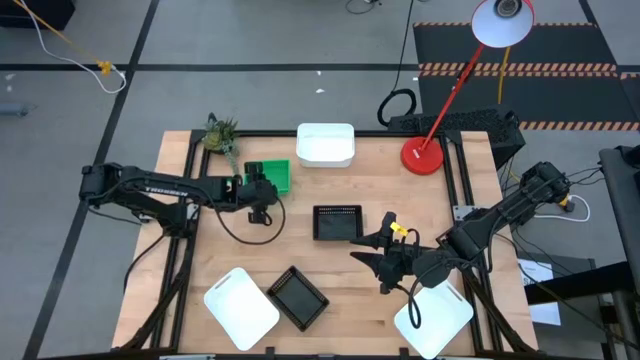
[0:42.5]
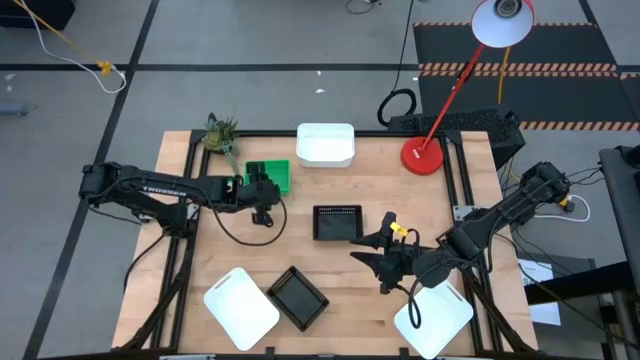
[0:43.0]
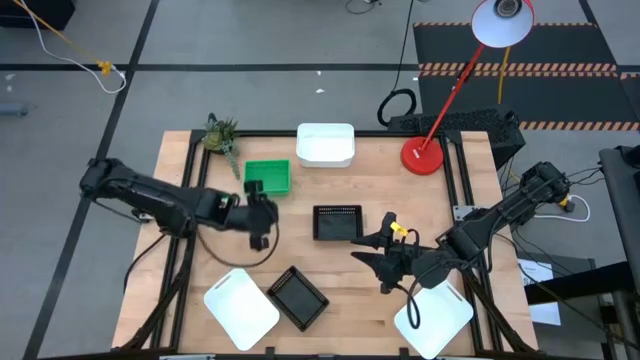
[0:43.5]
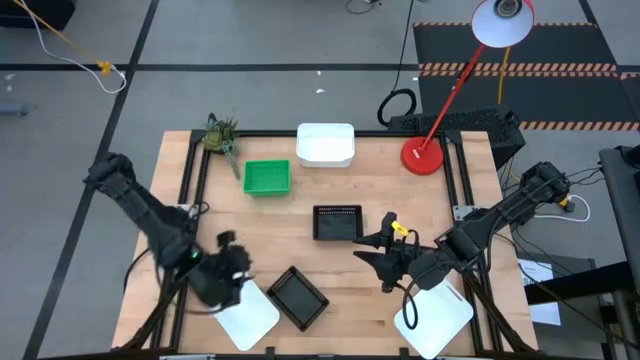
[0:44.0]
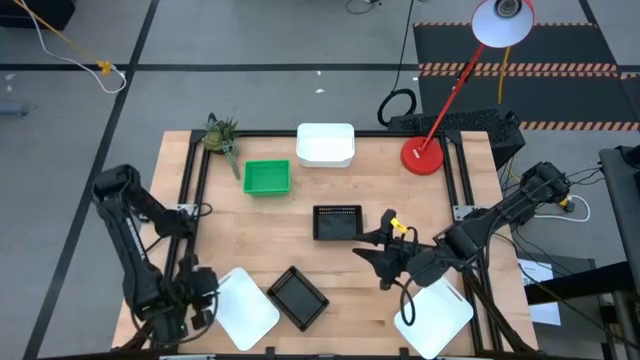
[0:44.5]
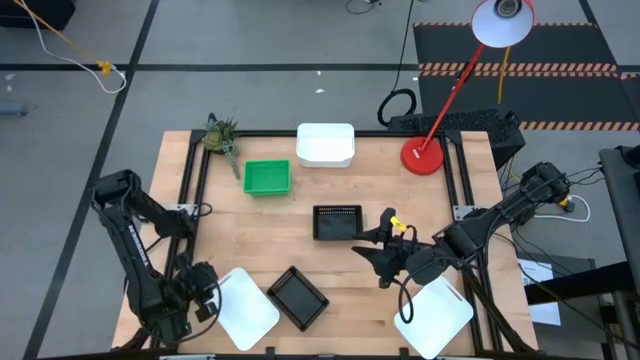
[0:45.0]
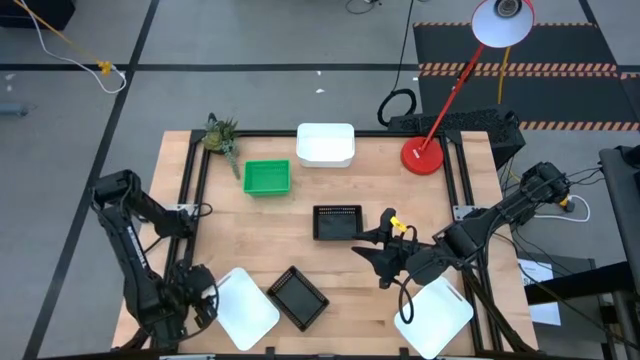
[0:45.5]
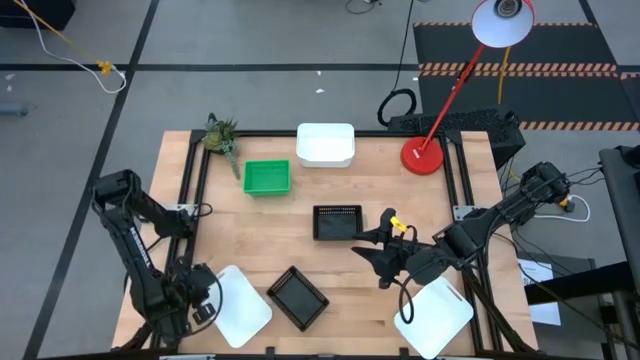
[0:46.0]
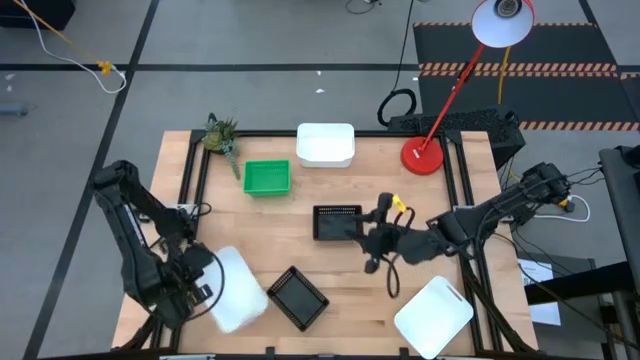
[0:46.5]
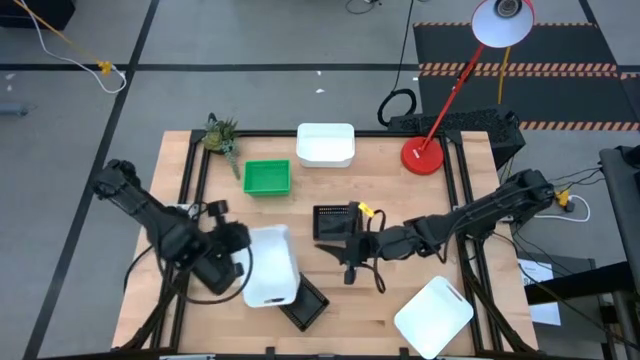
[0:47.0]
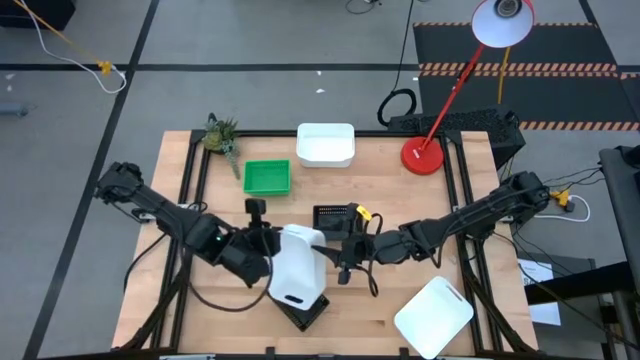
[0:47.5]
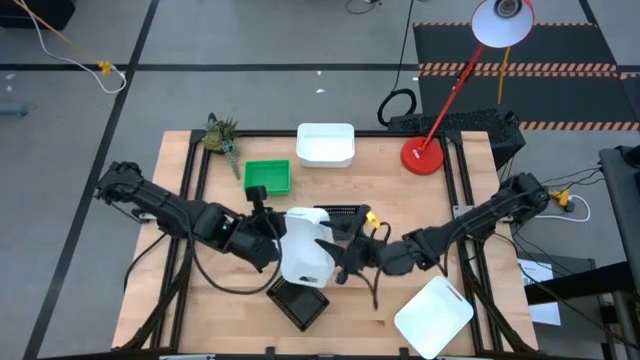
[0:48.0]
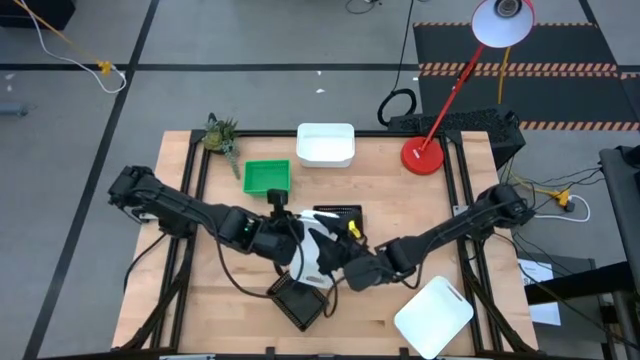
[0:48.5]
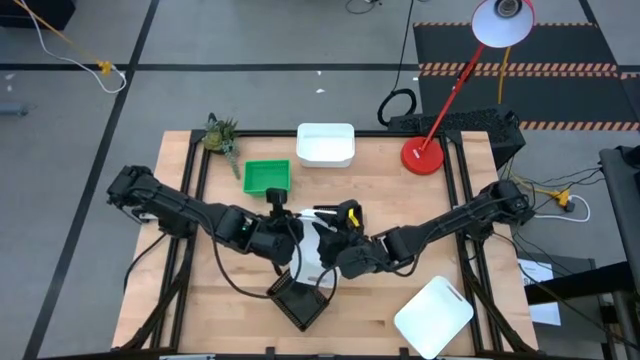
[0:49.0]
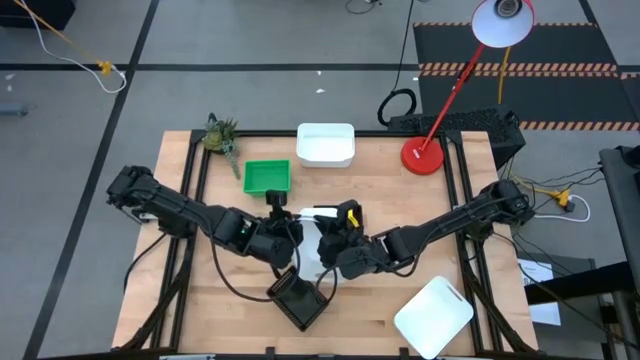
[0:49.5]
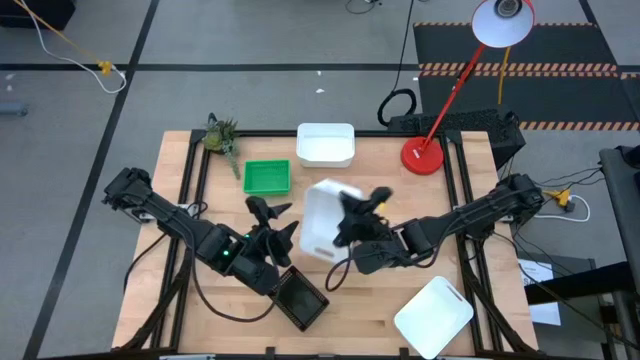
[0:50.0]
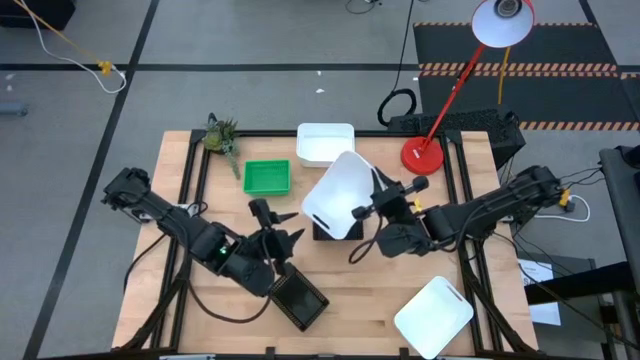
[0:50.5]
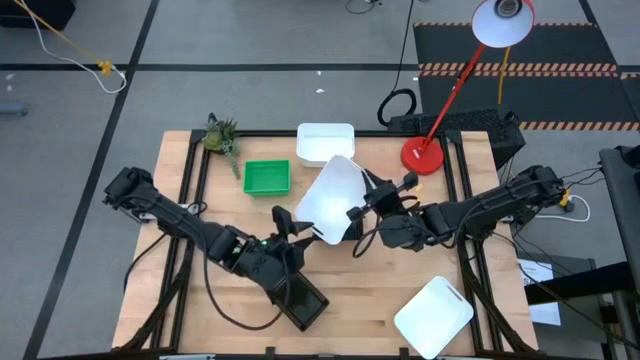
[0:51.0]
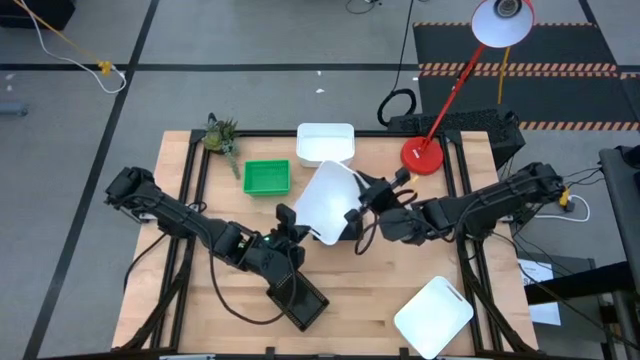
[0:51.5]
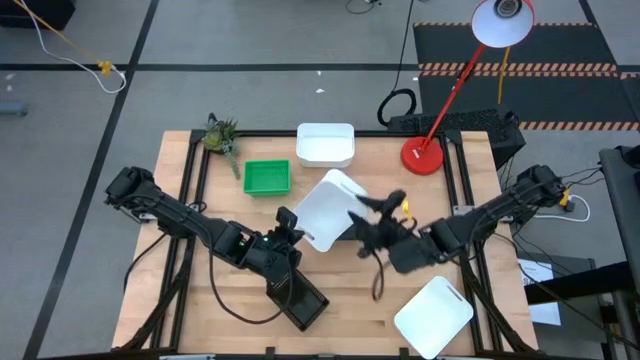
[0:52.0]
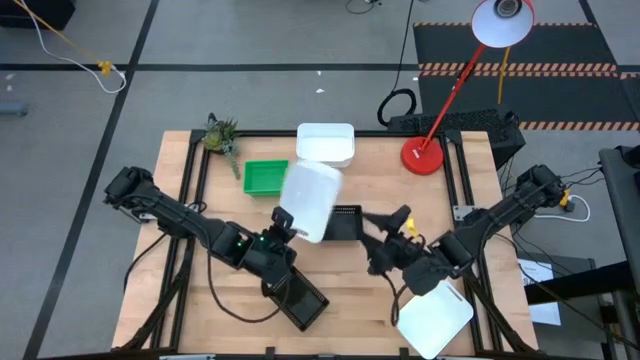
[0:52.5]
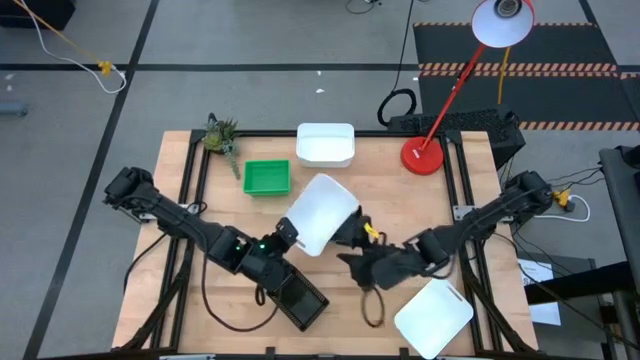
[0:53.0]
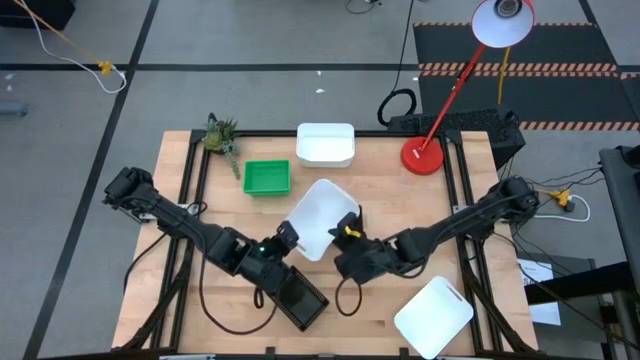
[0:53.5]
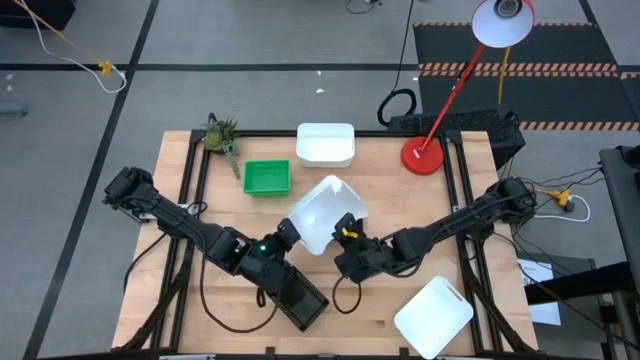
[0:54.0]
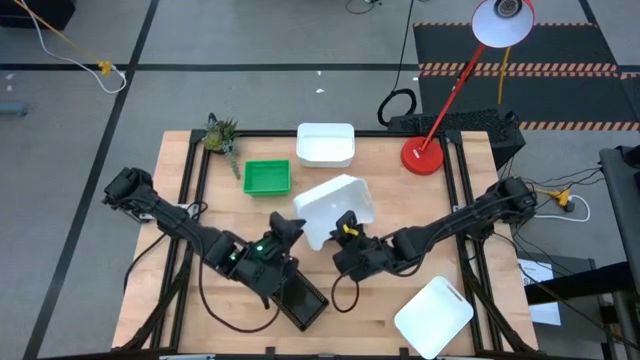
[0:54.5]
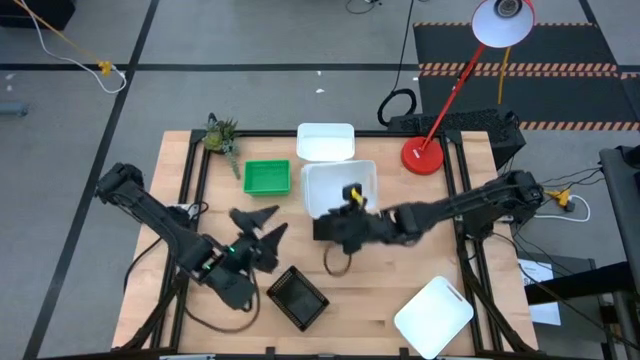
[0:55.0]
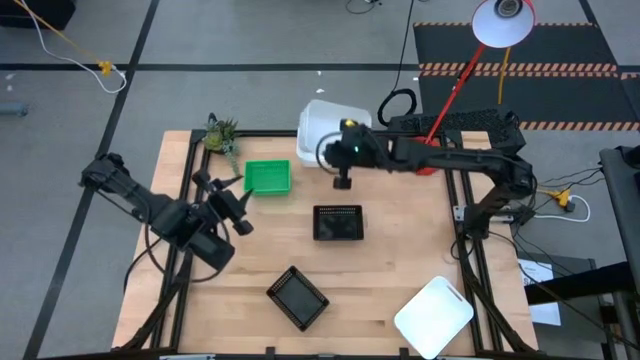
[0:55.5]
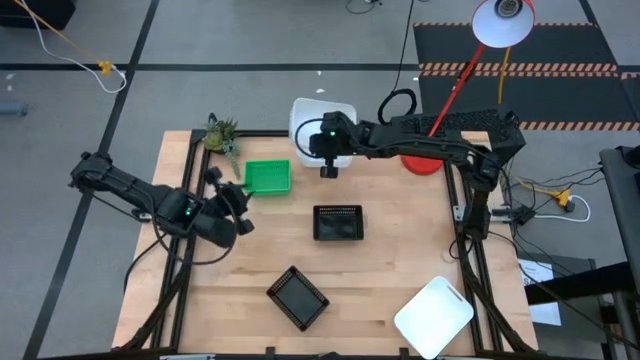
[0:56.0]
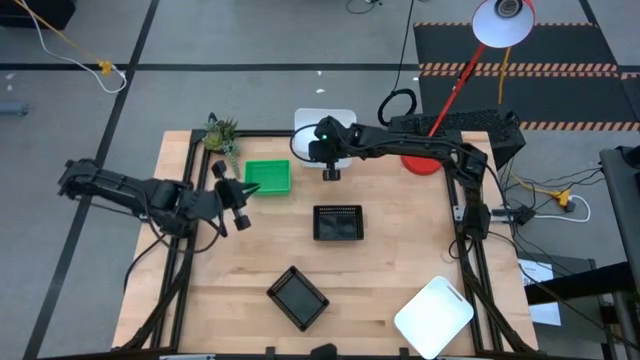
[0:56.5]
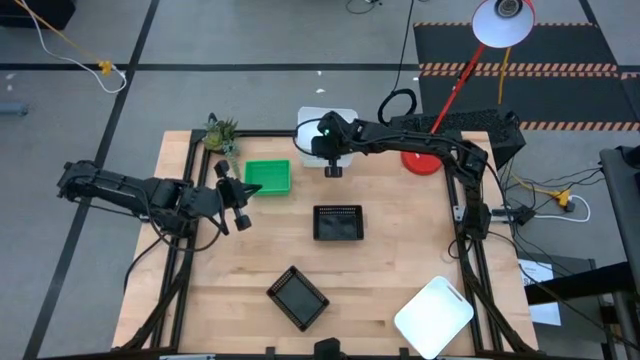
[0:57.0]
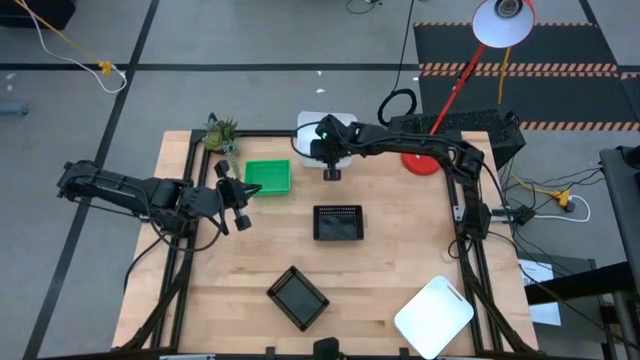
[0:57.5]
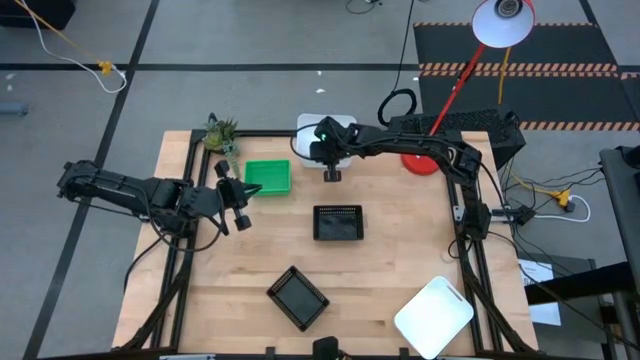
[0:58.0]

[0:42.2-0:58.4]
Stack the left white bin on the top white bin
